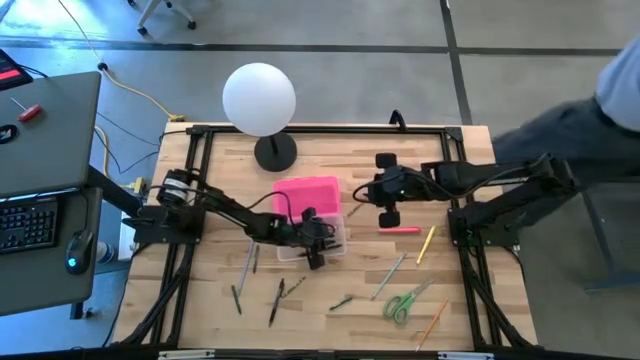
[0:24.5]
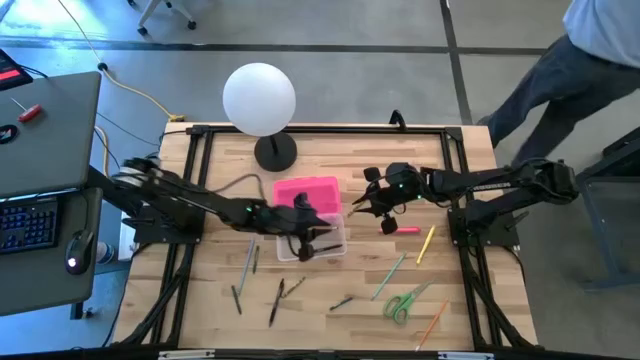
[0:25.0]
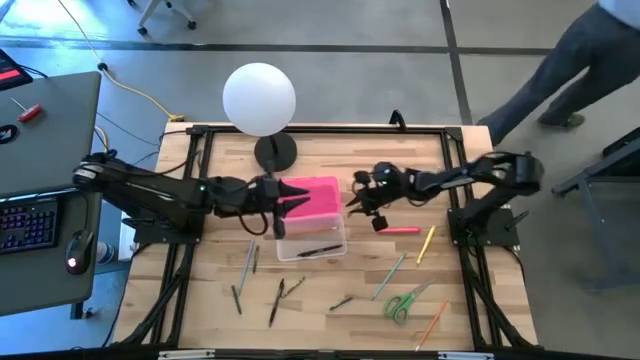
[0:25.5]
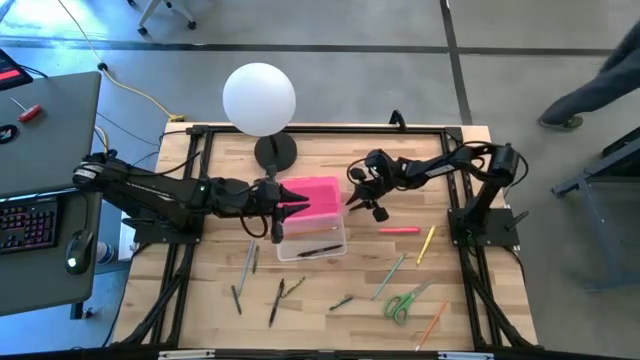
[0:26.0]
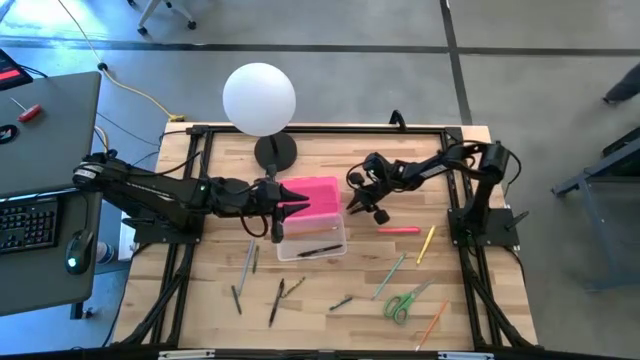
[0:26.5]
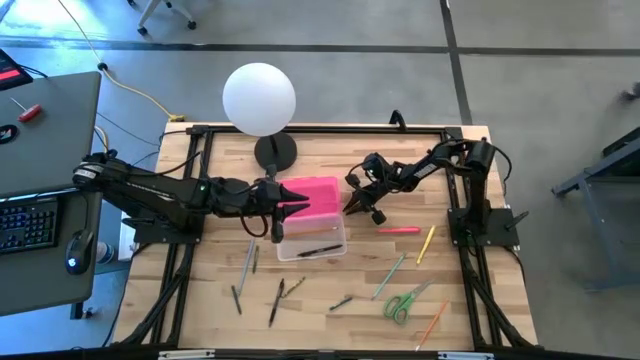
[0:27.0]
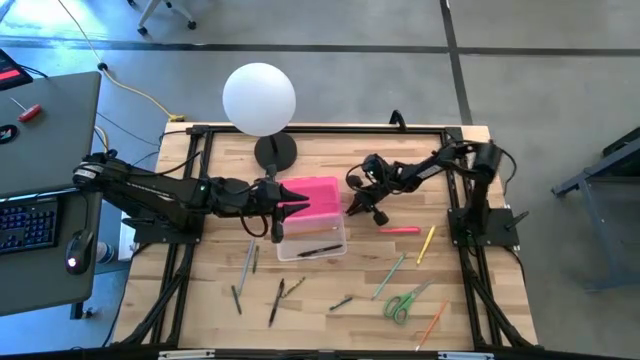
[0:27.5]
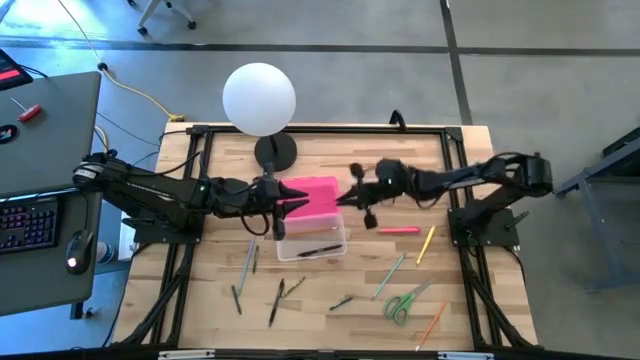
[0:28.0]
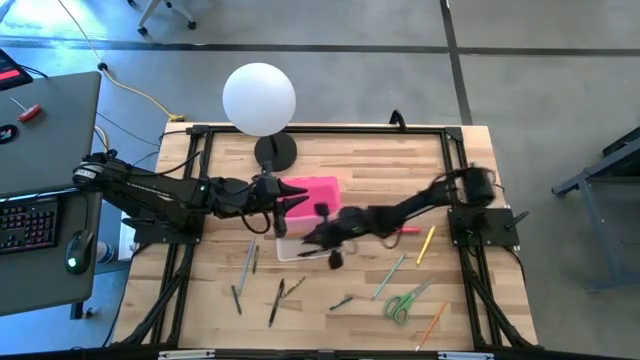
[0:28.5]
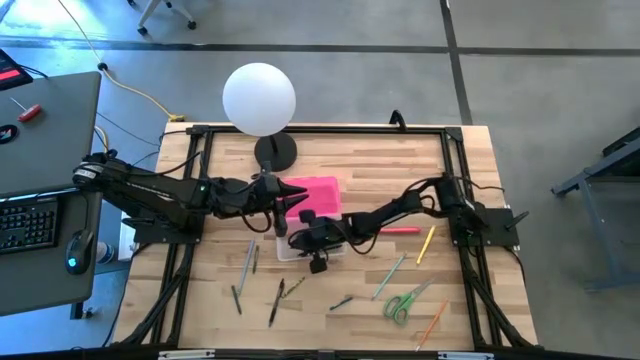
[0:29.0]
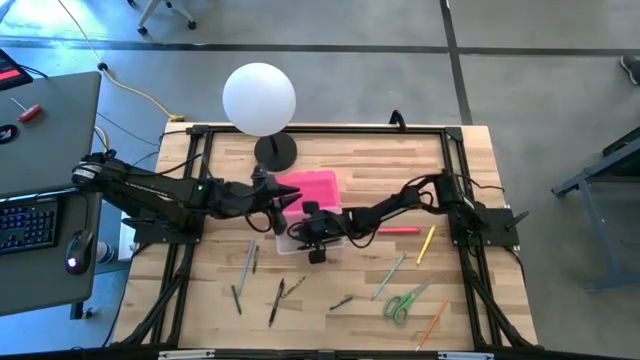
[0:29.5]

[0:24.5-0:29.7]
Task: Pick & place school supplies into a supply box
Put the top light green crayon into the pink supply box

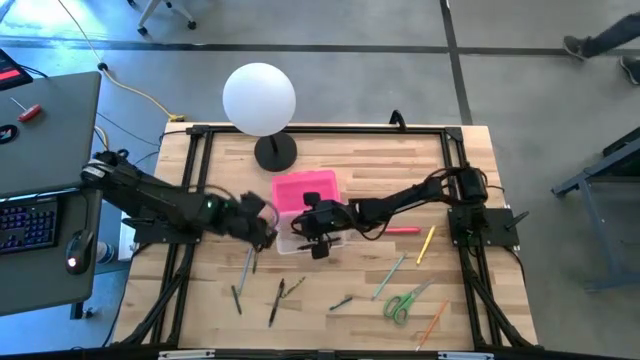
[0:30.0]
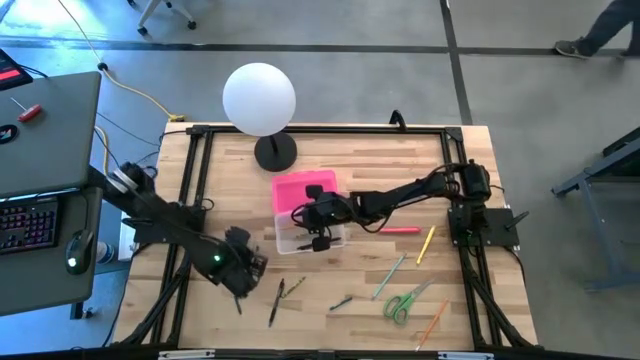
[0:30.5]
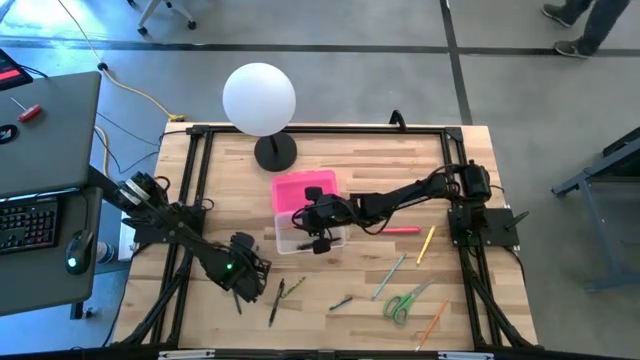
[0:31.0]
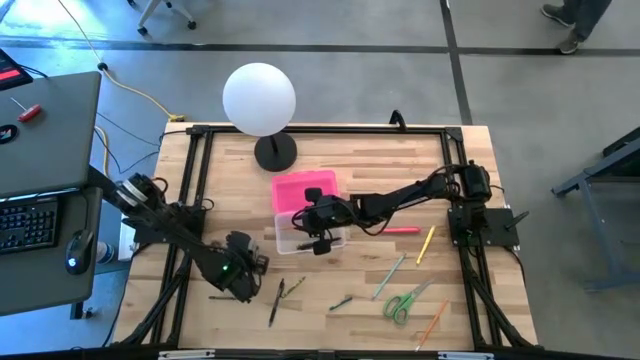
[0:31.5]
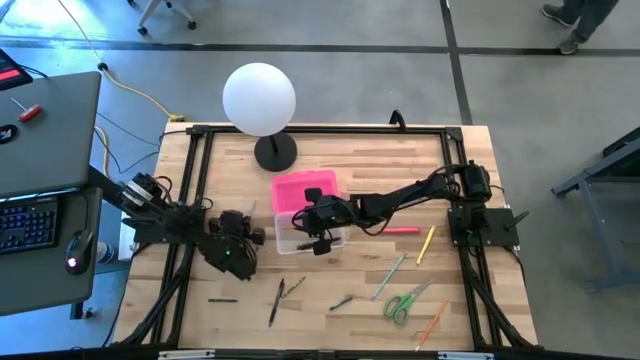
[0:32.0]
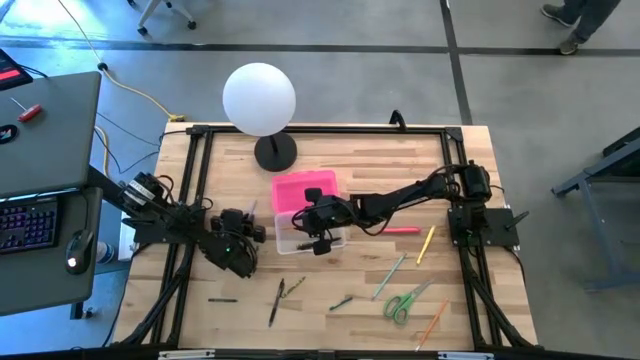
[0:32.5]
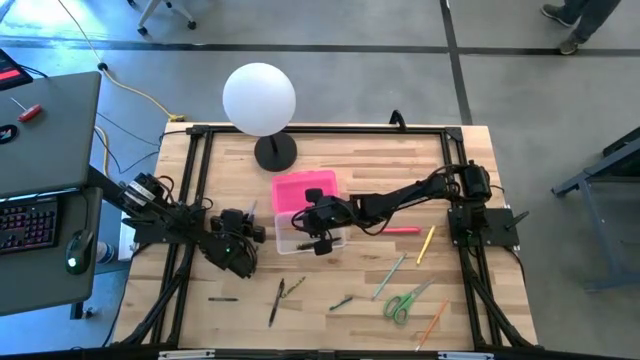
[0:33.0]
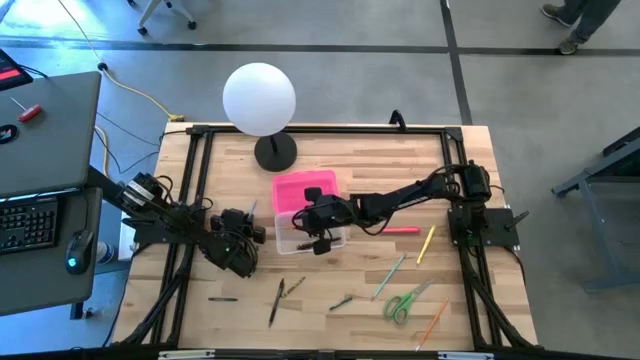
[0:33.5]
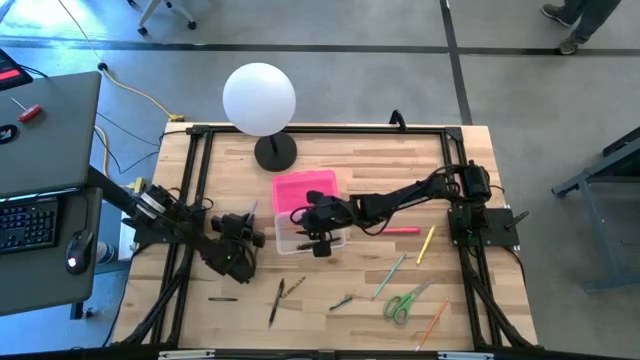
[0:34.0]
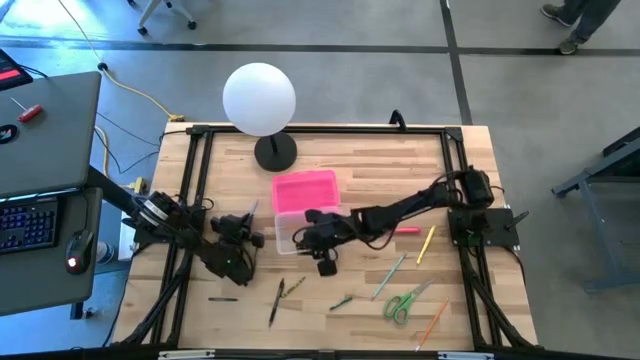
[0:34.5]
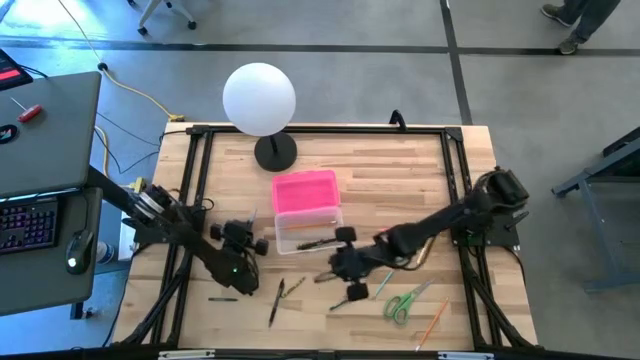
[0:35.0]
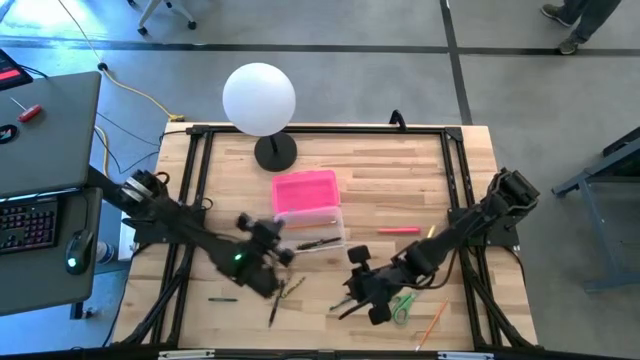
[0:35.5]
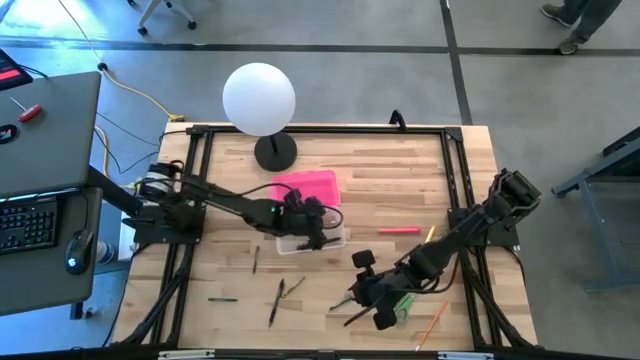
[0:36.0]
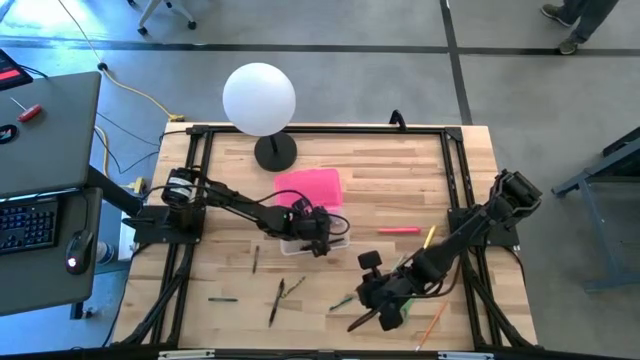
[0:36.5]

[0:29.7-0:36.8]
Put the left blue pencil into the pink supply box

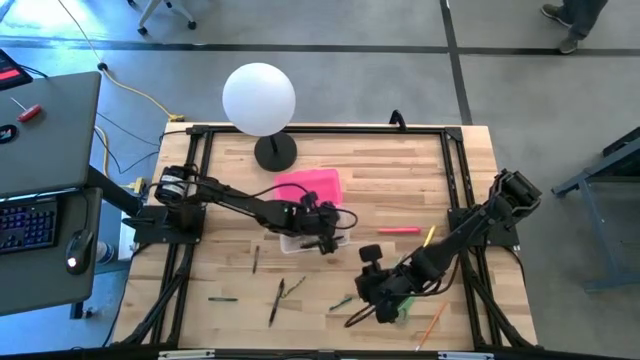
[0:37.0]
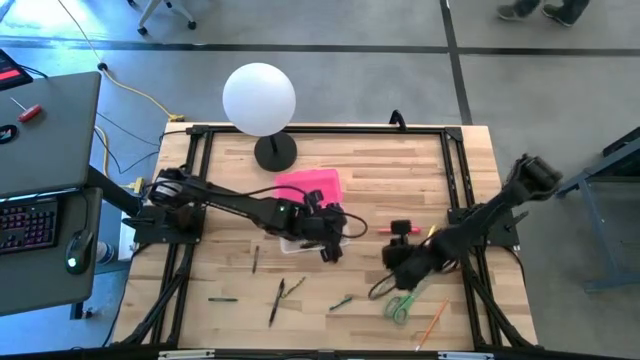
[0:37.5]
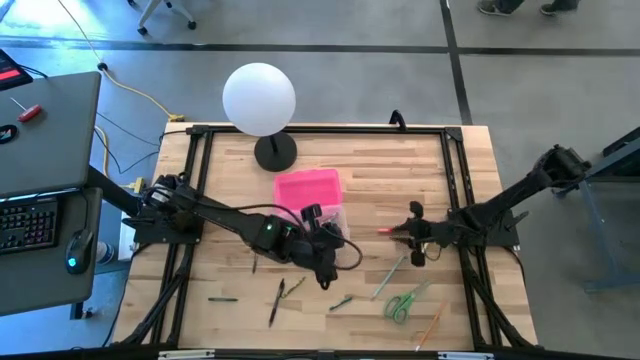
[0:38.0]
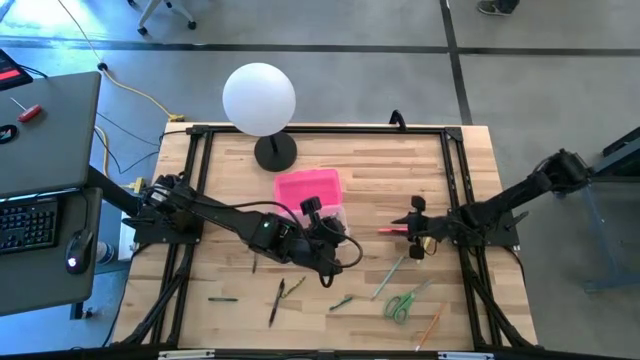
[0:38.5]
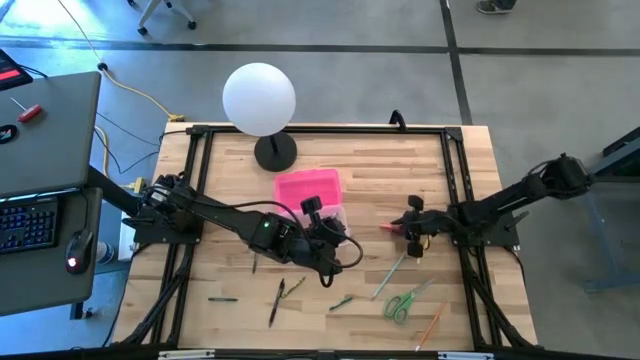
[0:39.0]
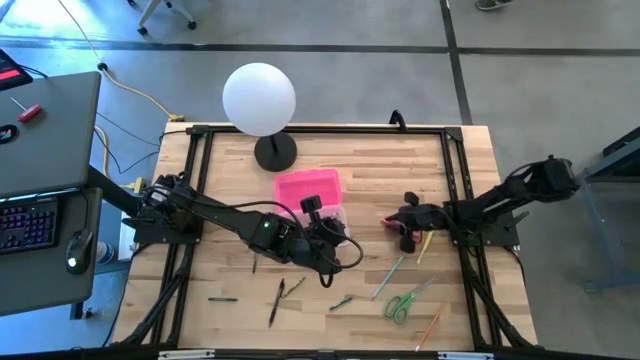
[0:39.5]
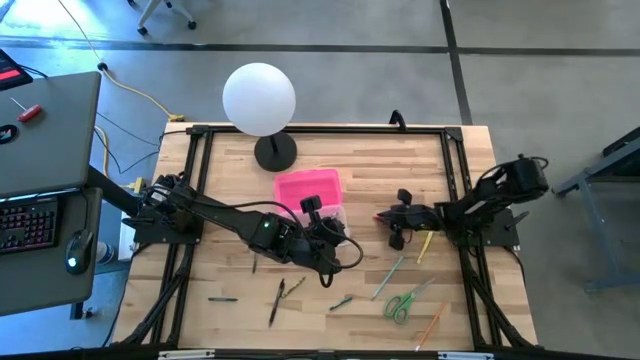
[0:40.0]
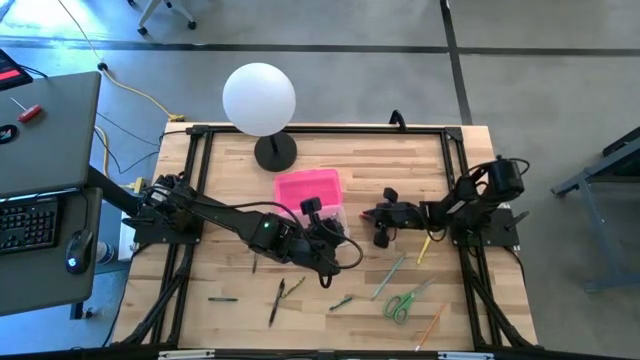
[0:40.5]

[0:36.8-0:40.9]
Put the pink pen into the pink supply box

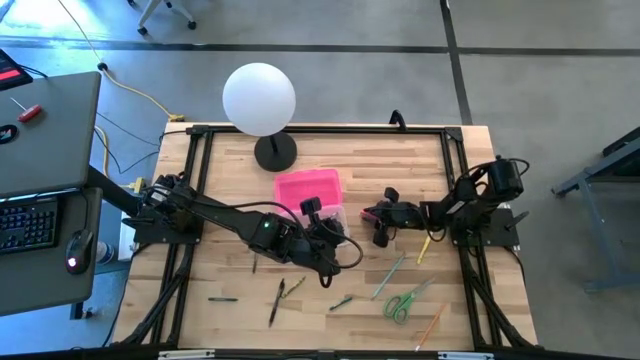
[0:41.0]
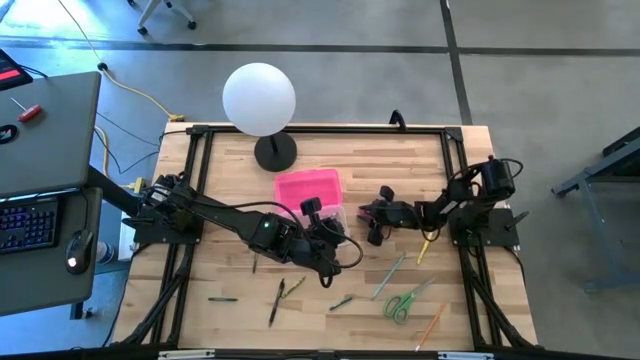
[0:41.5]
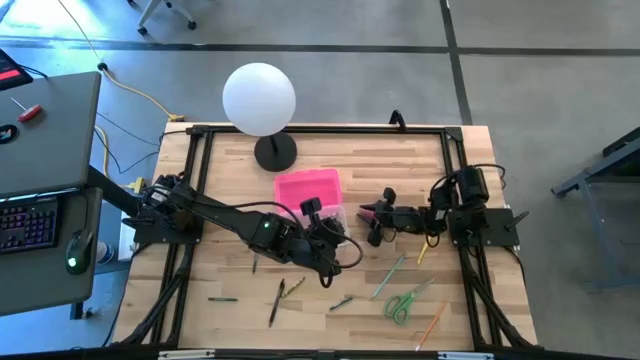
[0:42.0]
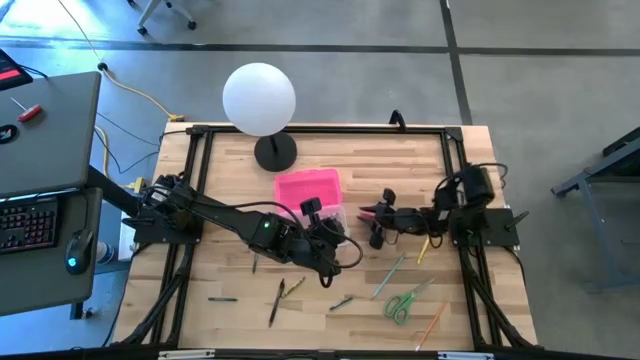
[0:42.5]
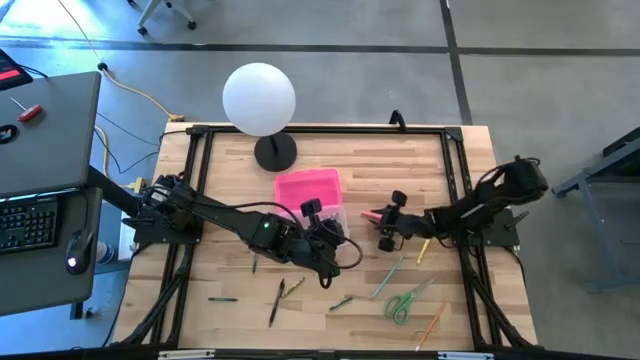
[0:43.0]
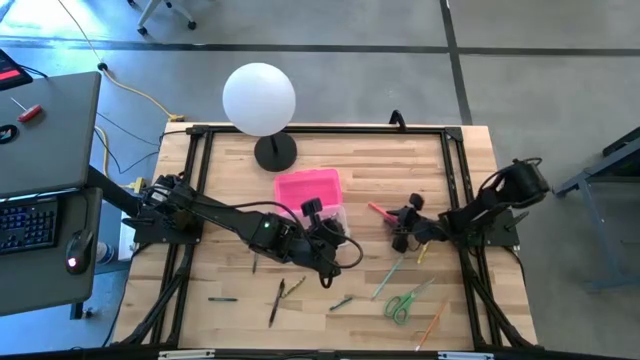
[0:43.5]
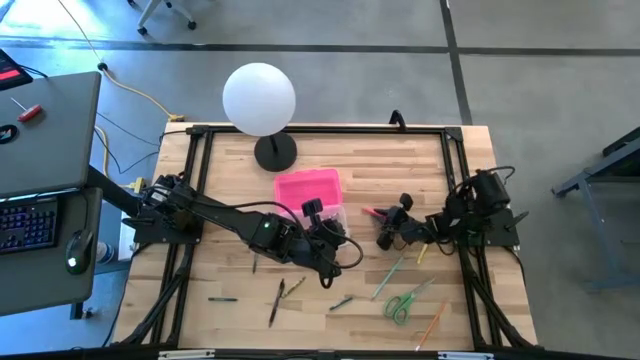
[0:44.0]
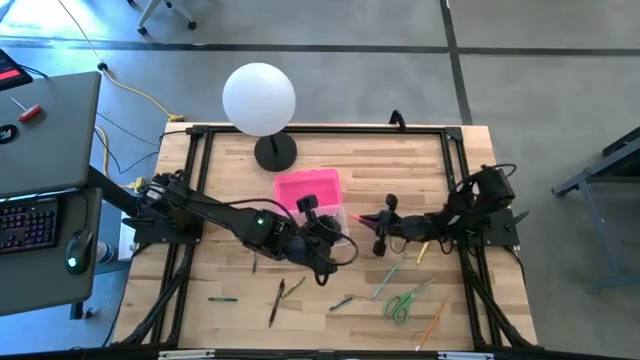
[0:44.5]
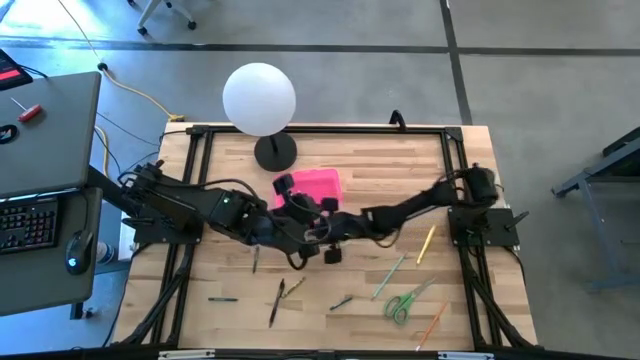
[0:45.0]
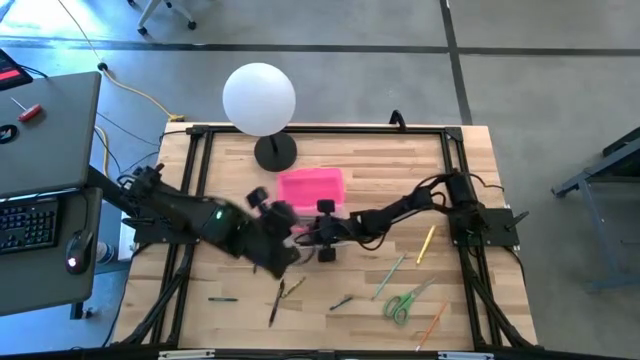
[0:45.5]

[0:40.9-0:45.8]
Put the pink pen into the pink supply box
